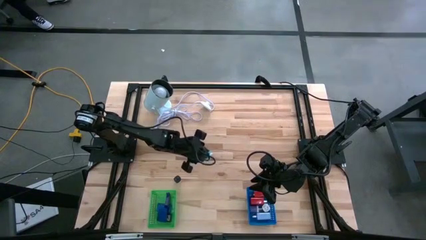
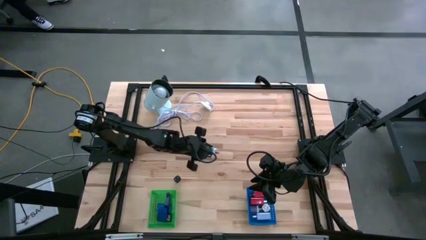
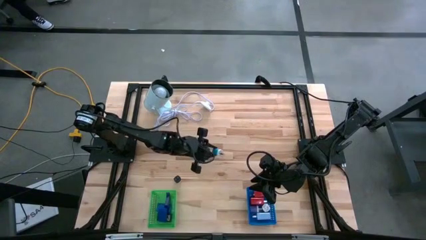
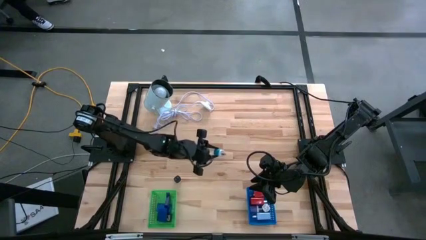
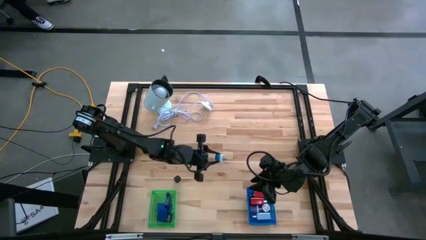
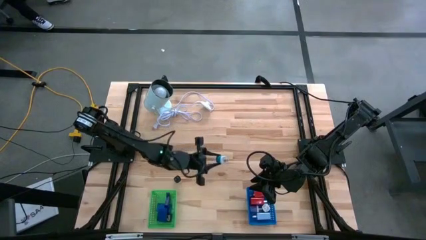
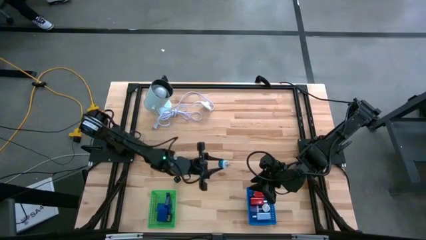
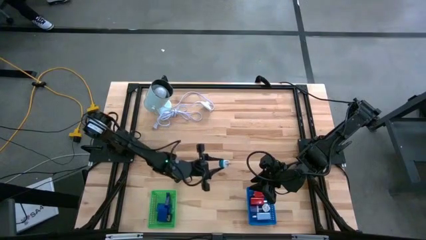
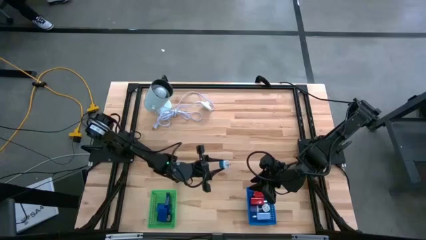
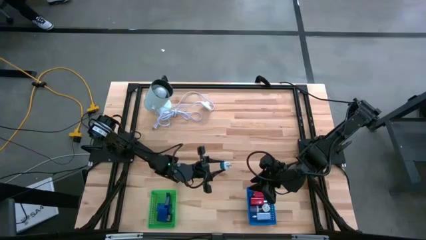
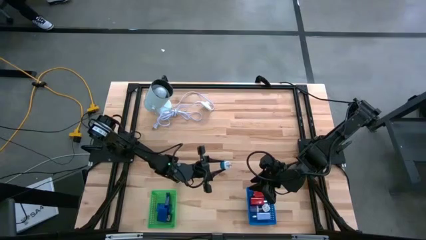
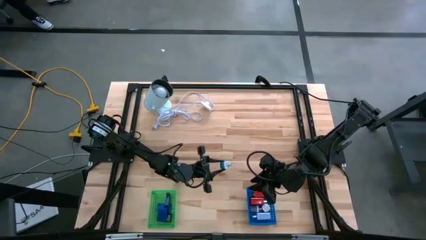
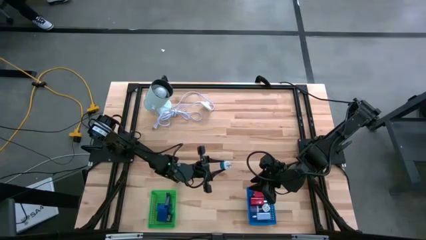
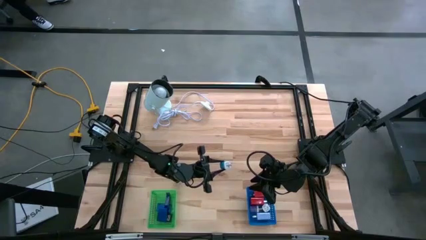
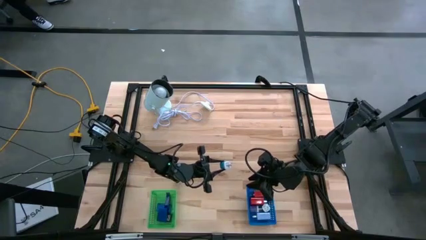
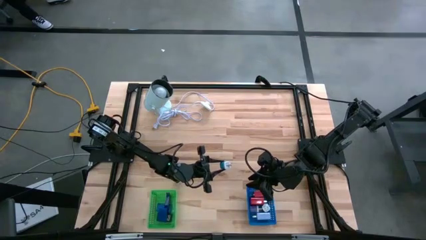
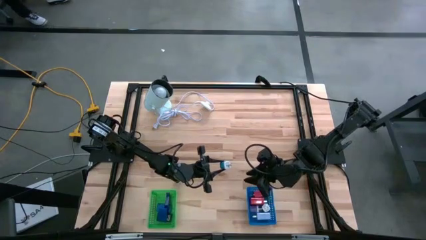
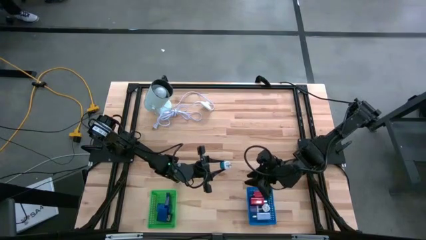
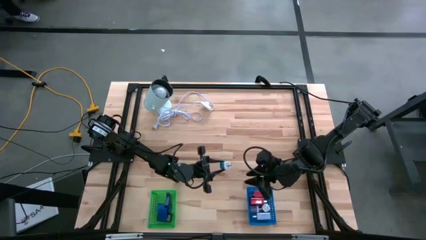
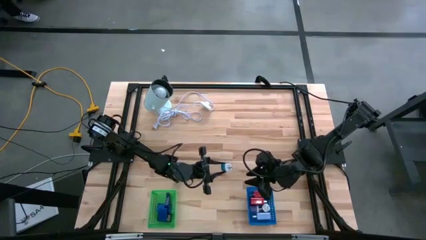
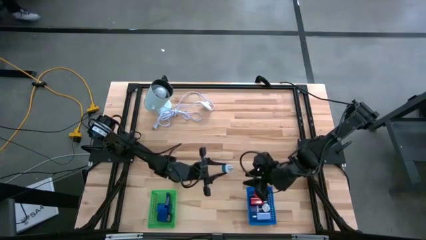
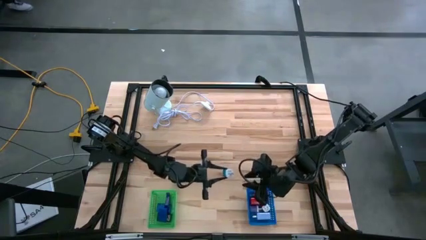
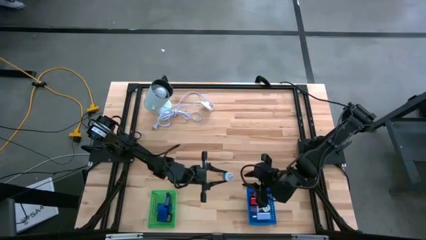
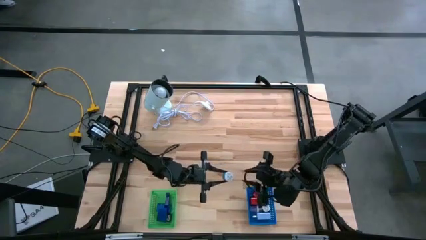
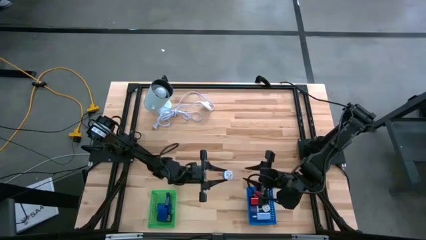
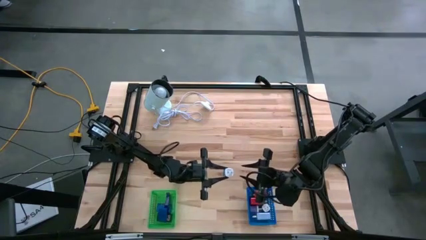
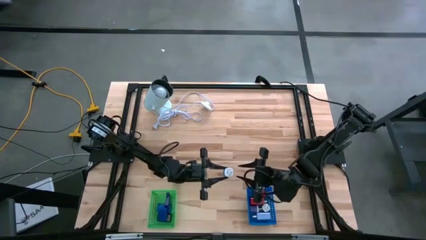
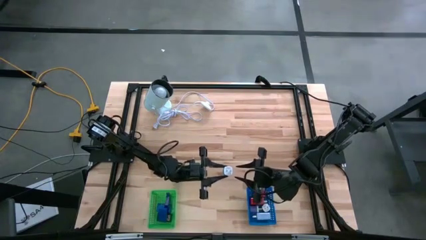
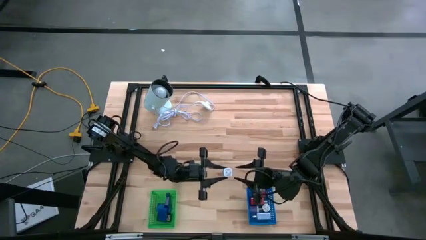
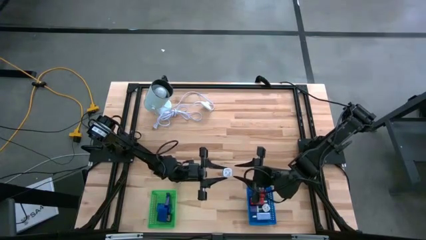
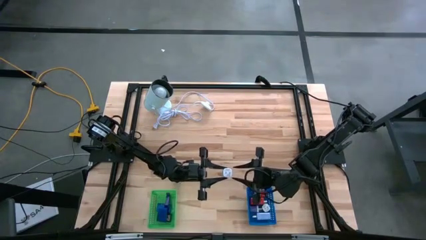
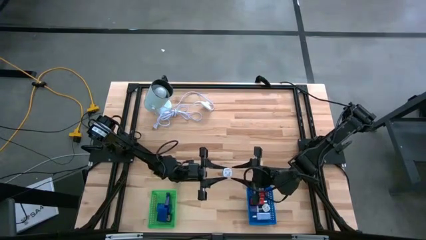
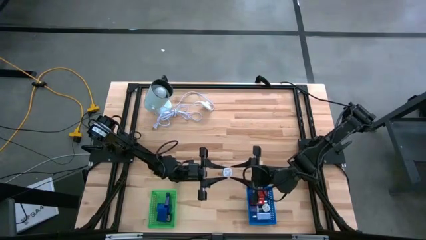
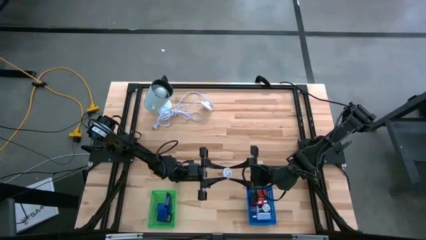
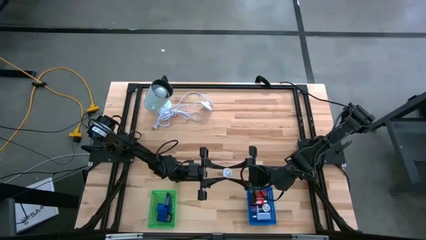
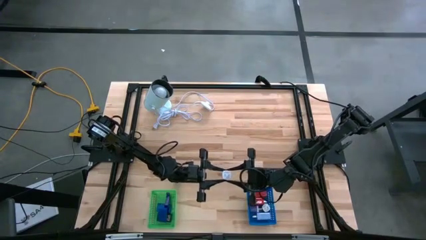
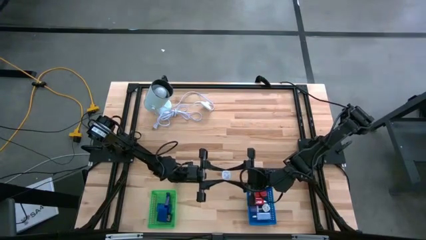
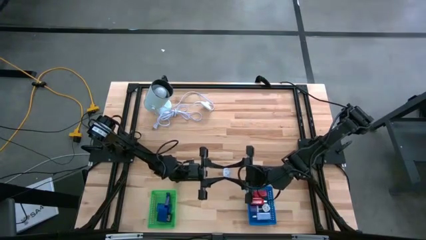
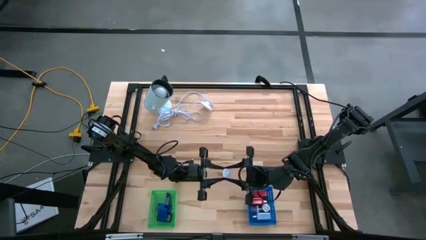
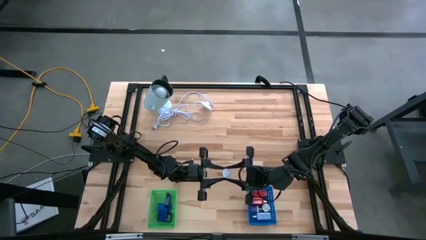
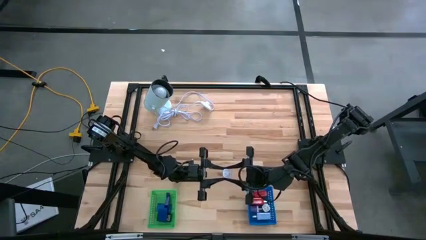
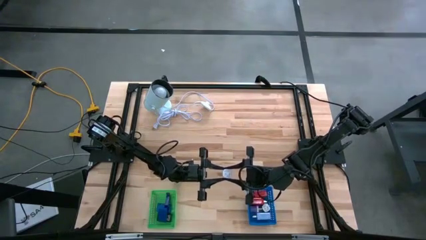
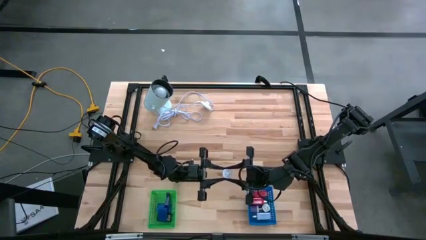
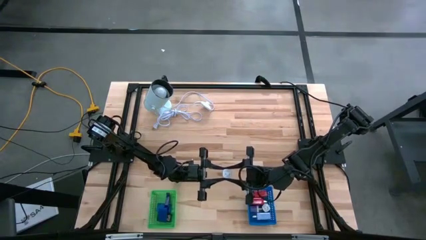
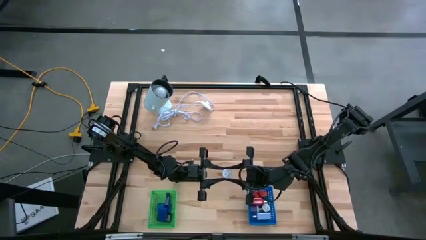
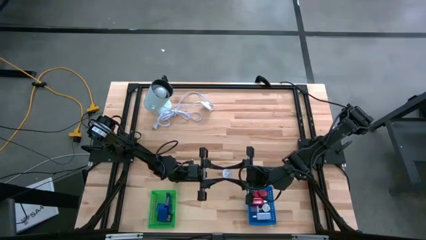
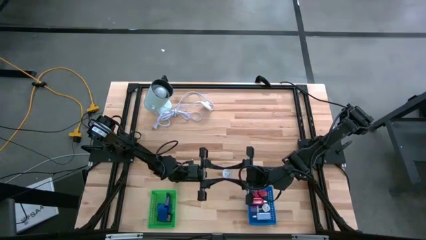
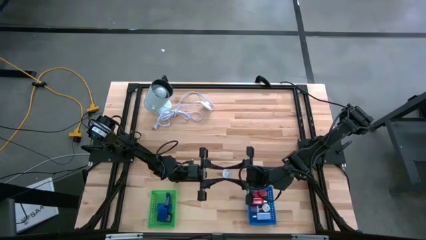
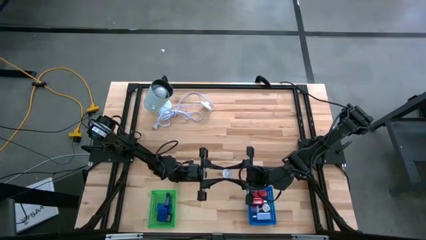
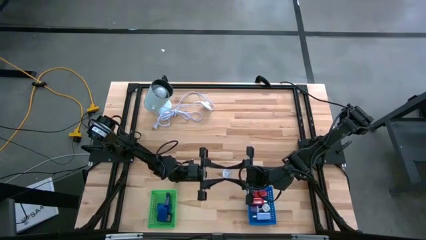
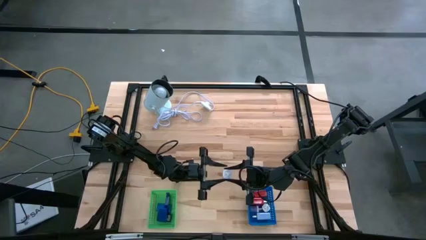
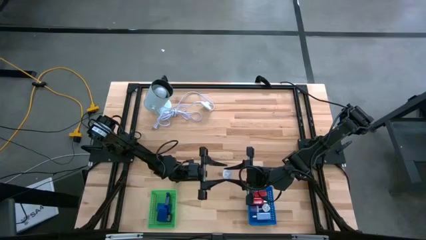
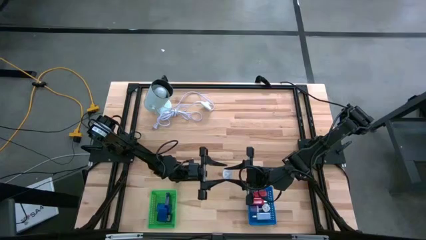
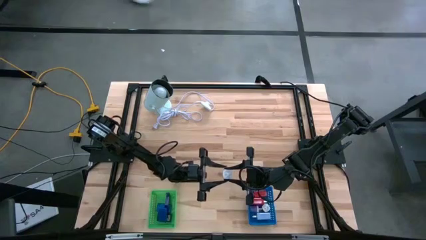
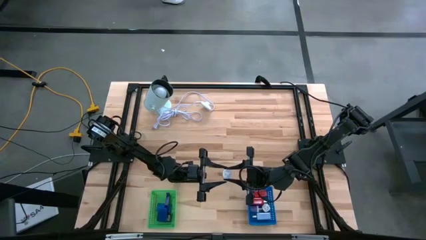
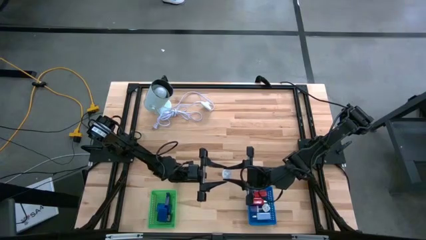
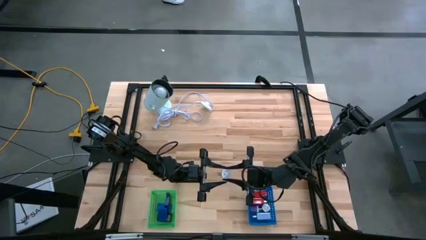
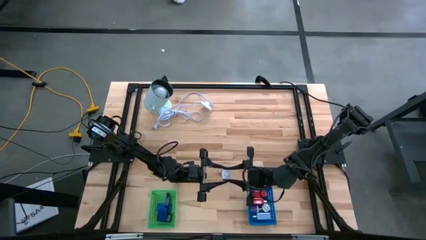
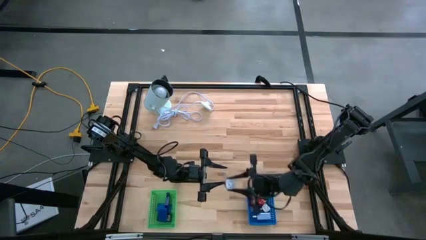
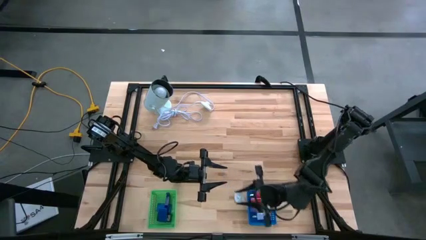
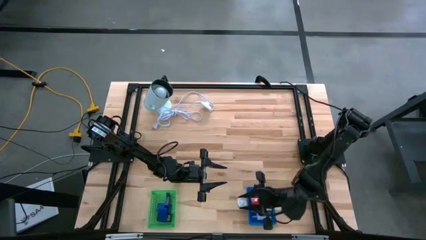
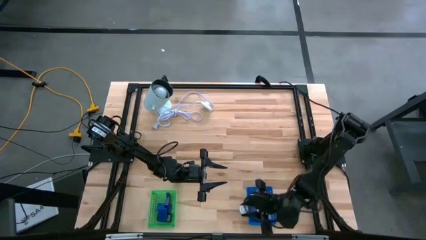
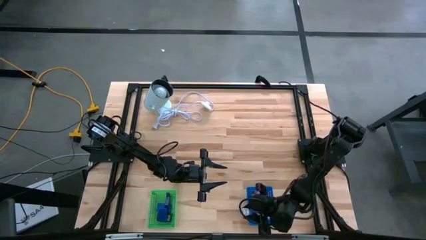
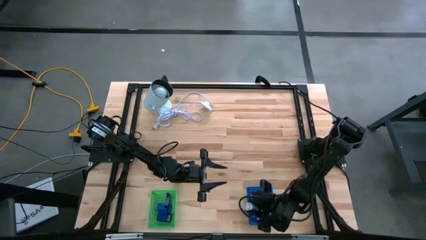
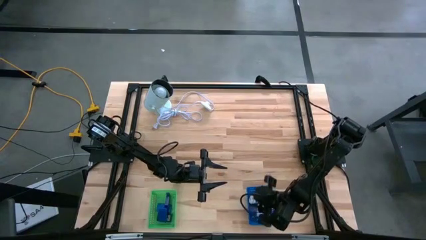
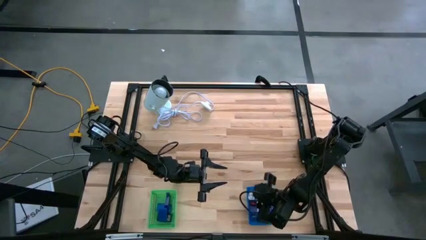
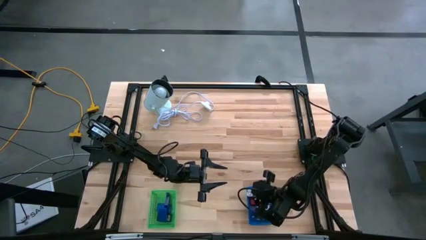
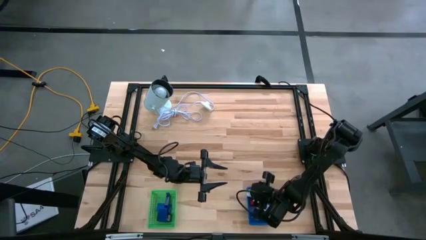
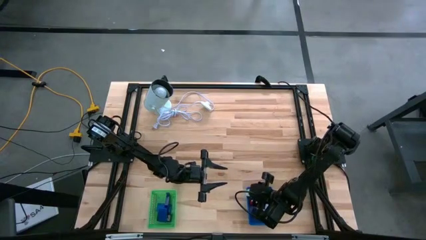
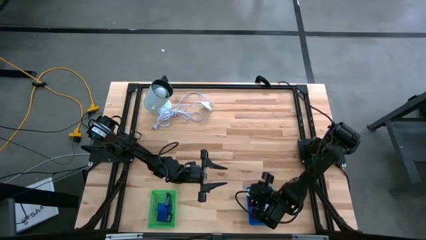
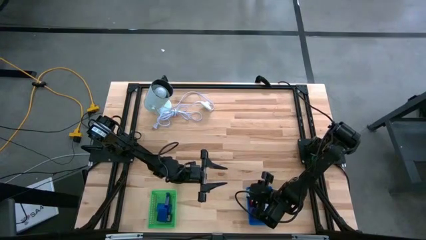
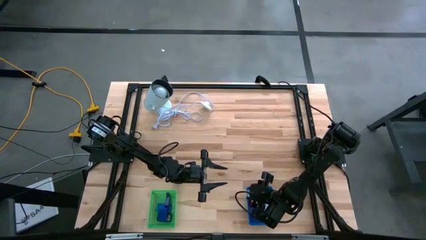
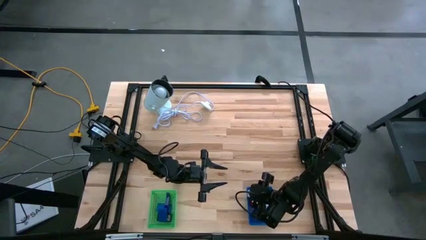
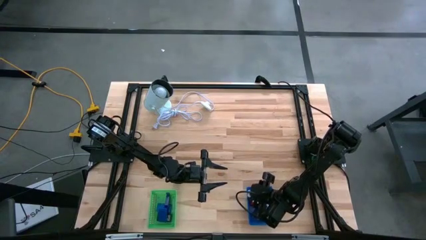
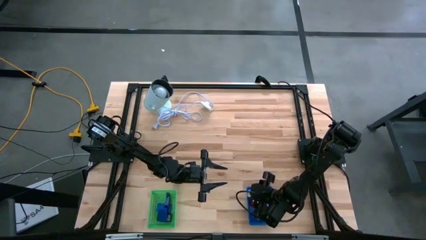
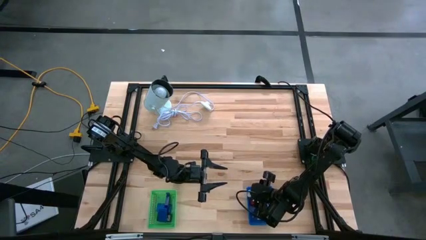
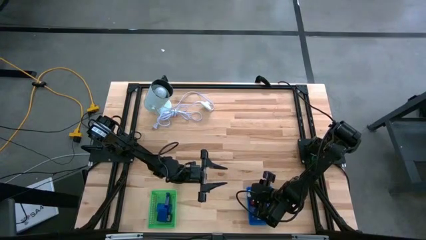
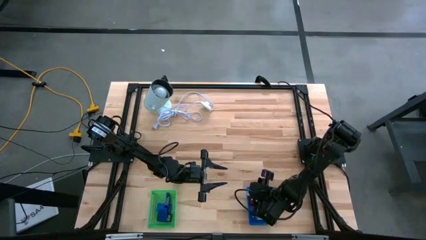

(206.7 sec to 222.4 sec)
Task: Pick & Place Office items
Put the blue charger adapter into the blue bin
